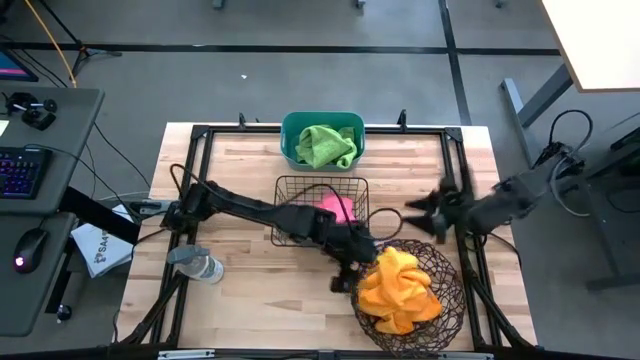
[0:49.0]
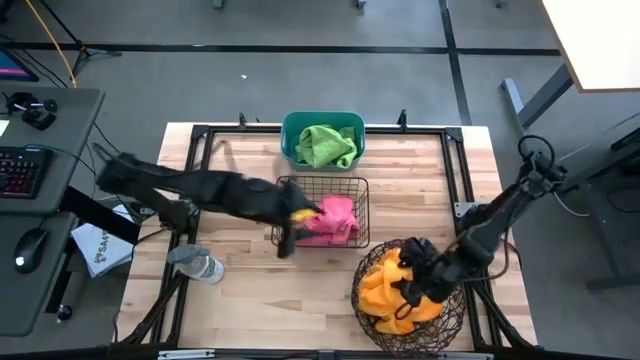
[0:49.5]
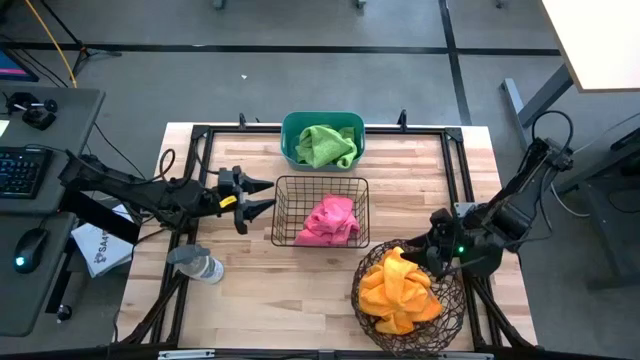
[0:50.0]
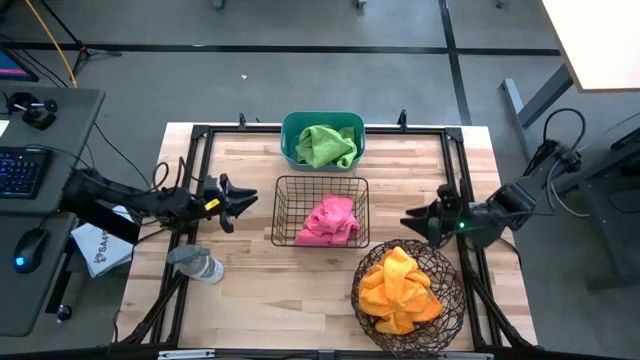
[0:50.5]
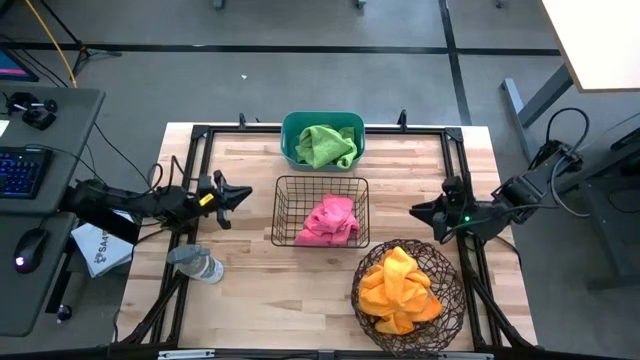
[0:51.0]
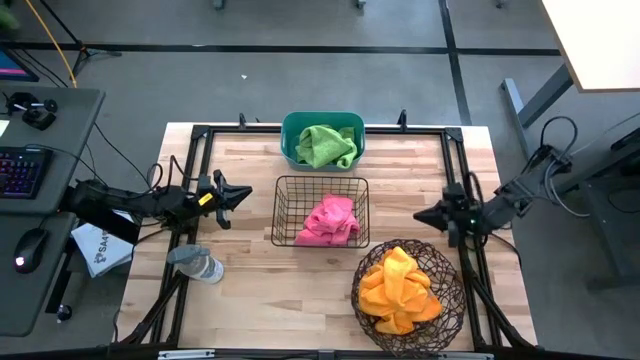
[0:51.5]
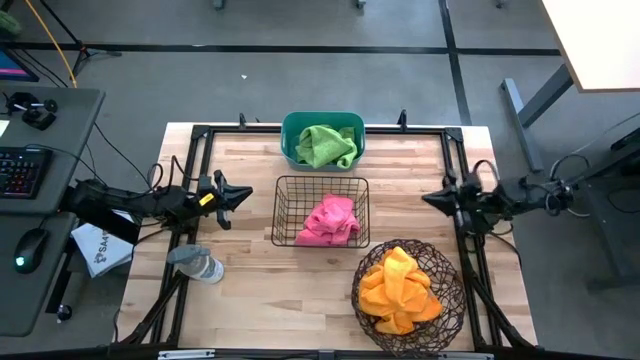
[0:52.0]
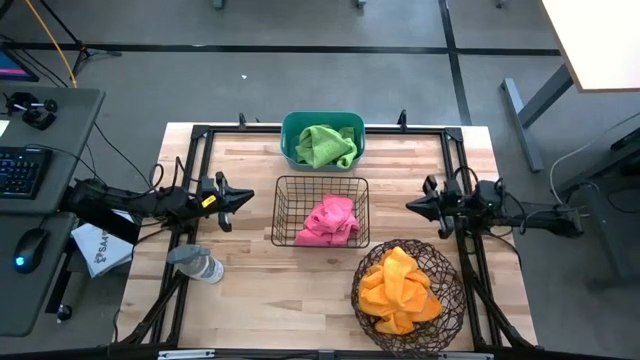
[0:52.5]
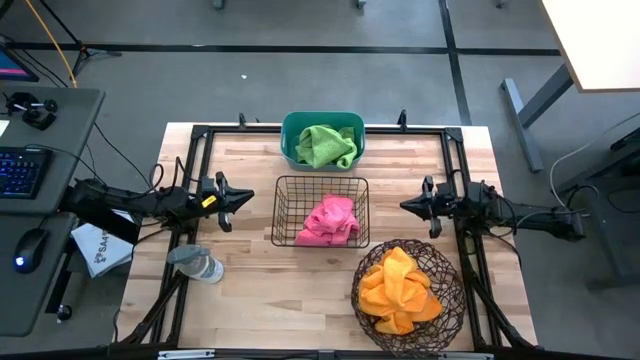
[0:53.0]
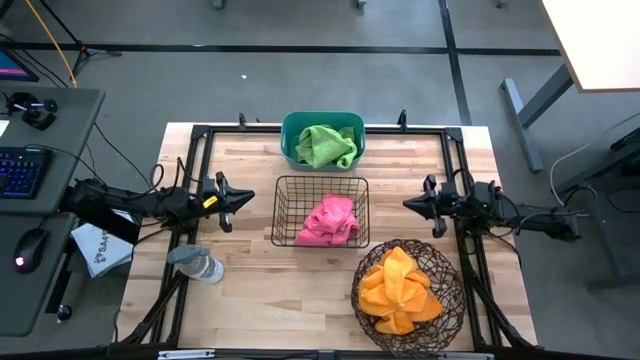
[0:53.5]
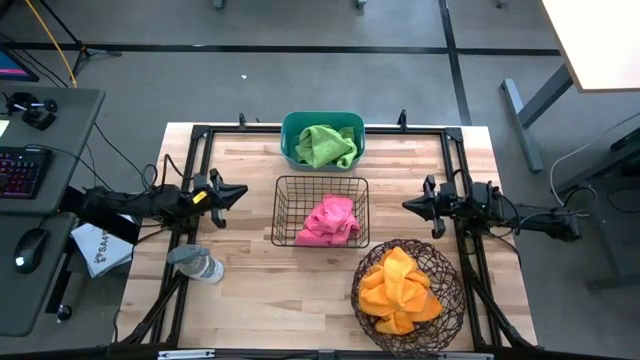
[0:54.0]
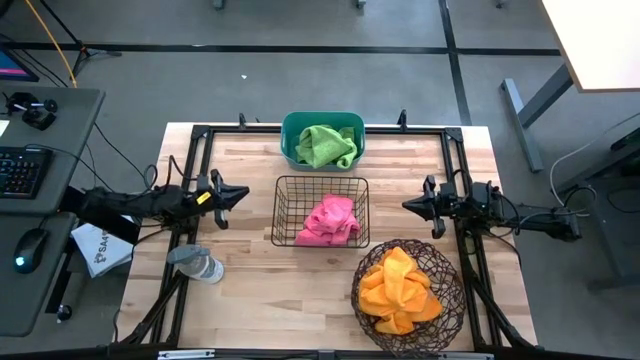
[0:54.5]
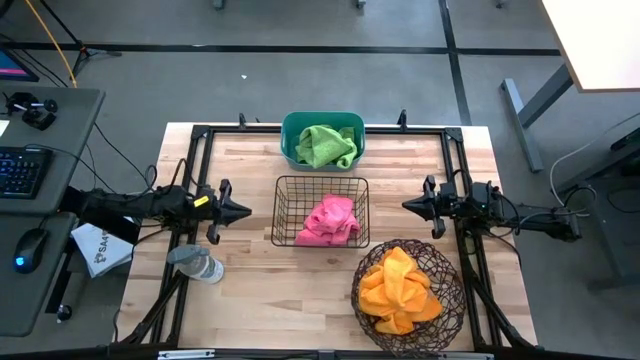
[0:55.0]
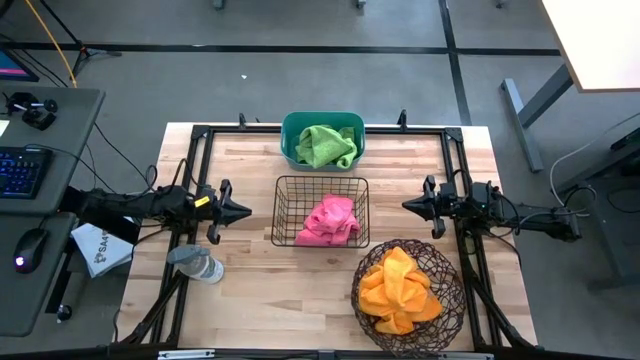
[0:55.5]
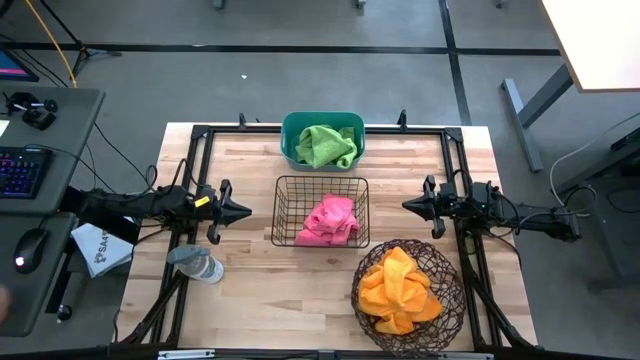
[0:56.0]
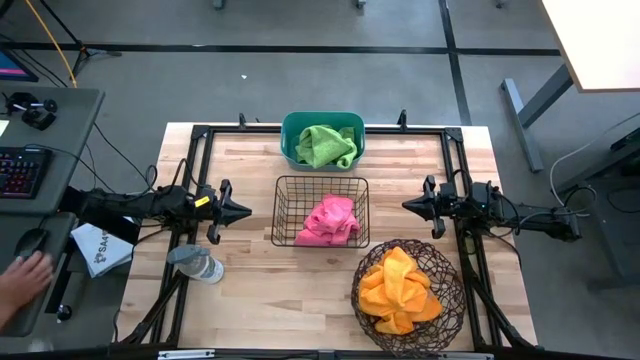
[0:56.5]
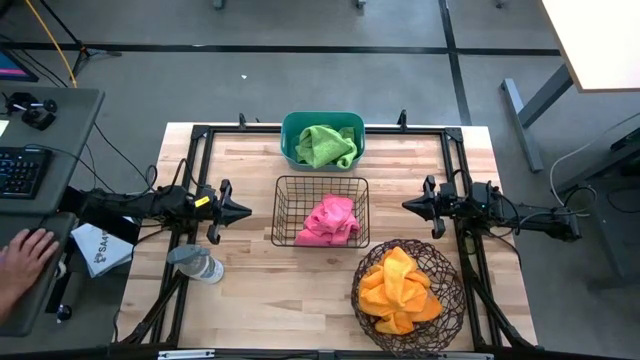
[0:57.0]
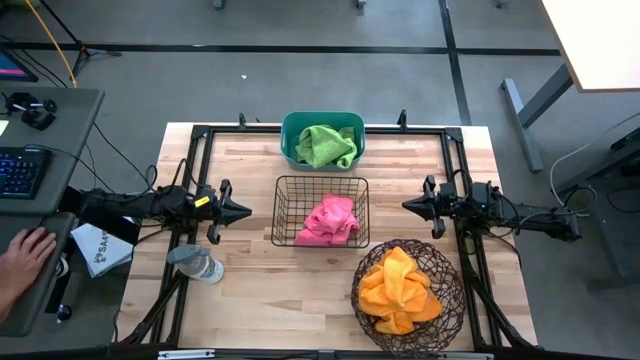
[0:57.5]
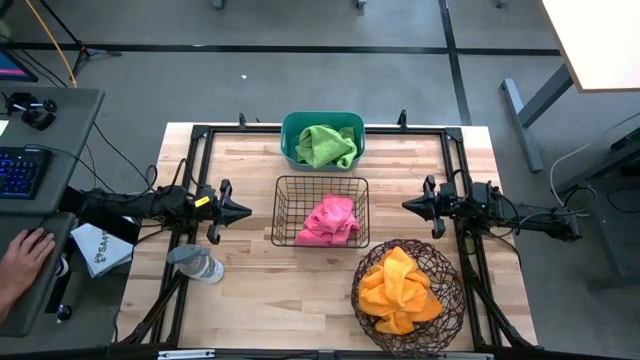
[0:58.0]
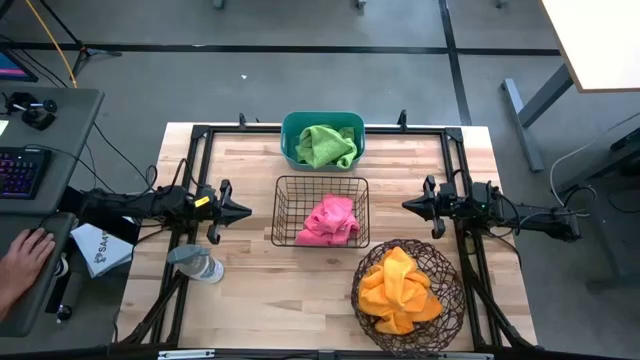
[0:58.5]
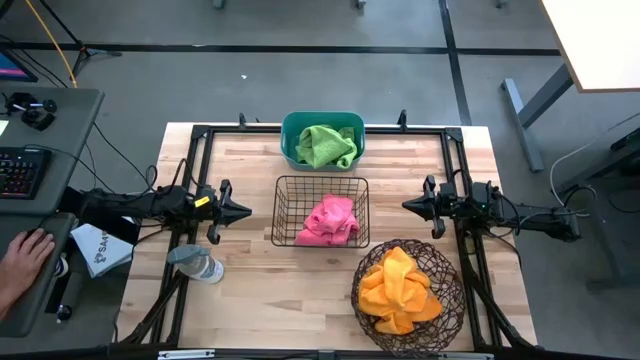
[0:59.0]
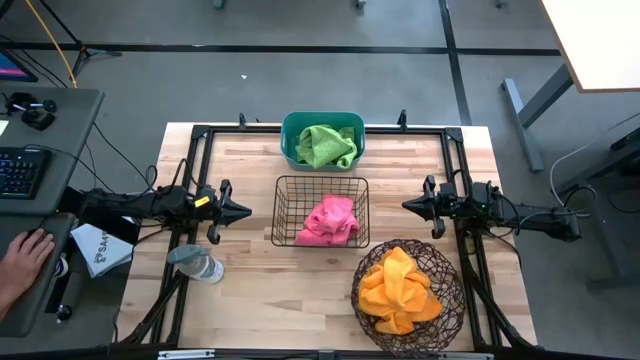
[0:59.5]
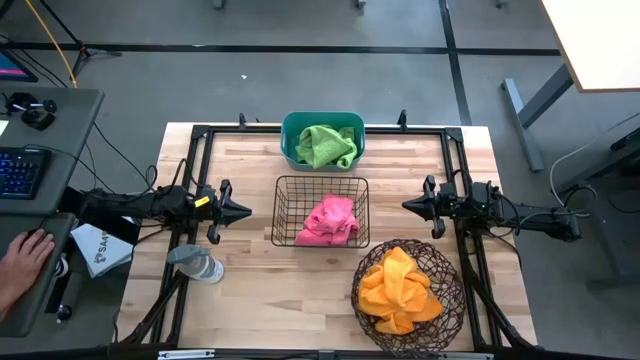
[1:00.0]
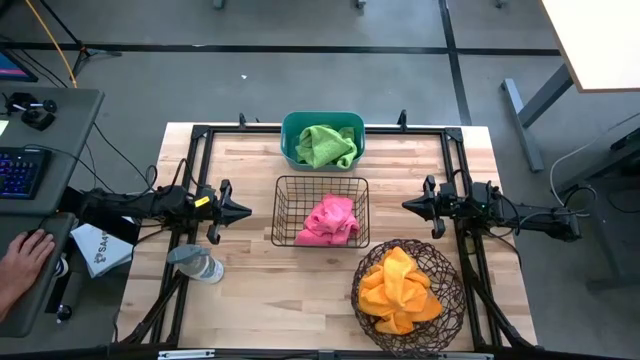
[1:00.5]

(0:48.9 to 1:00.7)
Task: Sort microfiber towel by color & place in baskets
Return to Home Position

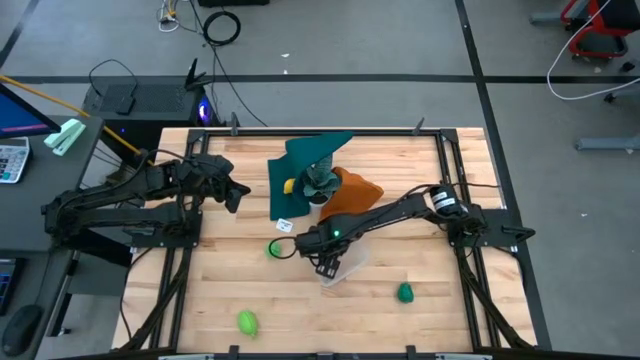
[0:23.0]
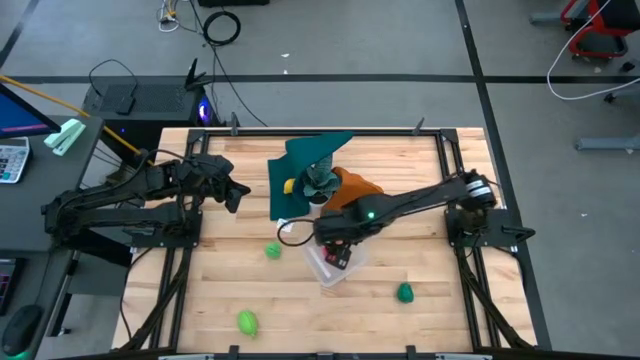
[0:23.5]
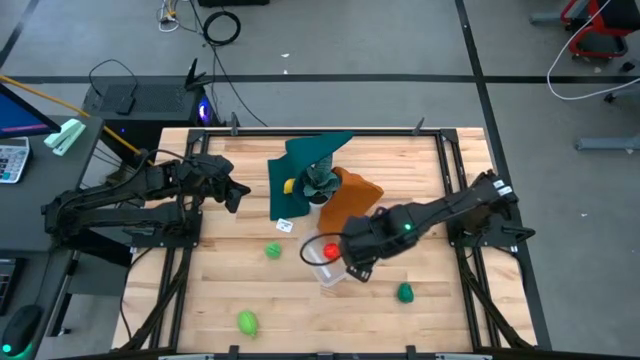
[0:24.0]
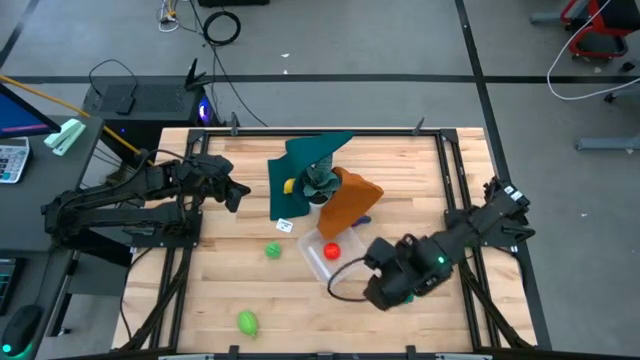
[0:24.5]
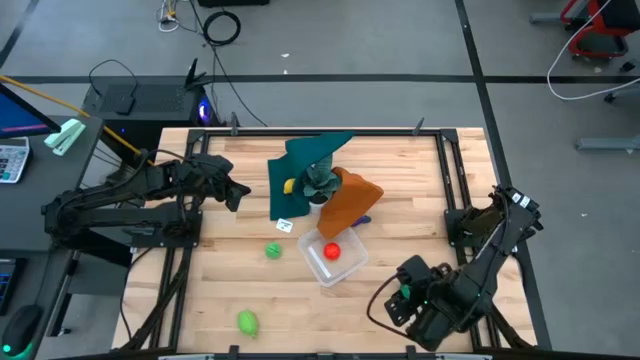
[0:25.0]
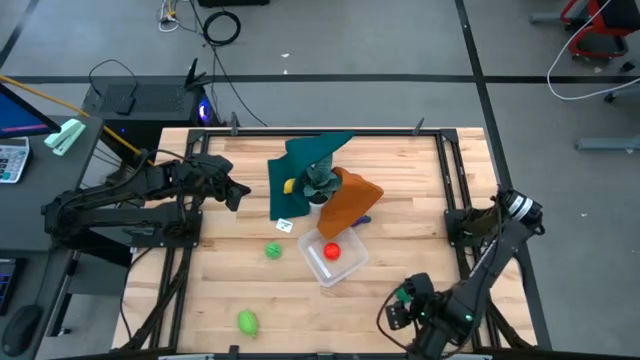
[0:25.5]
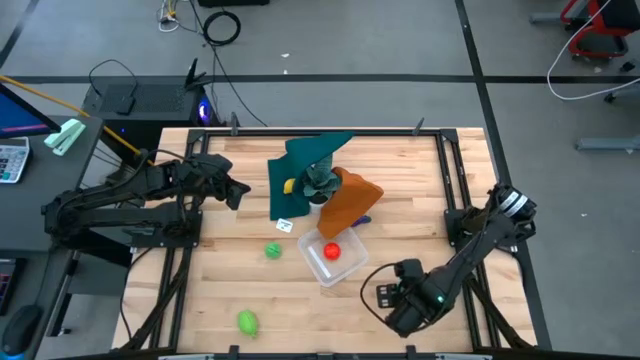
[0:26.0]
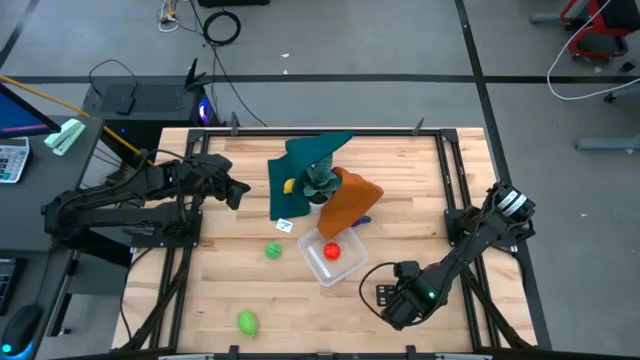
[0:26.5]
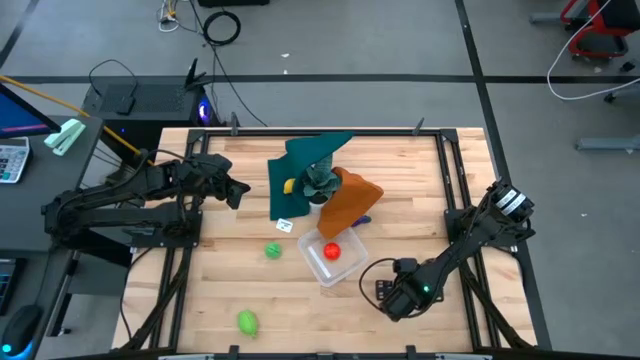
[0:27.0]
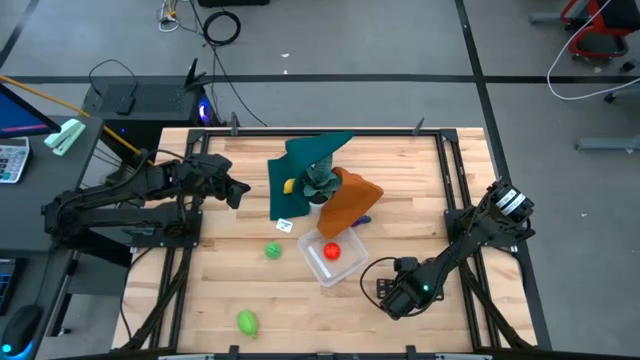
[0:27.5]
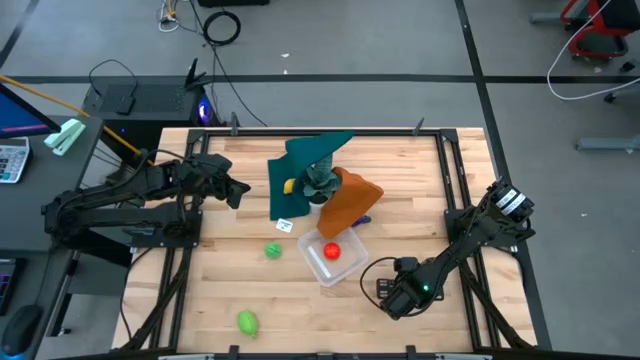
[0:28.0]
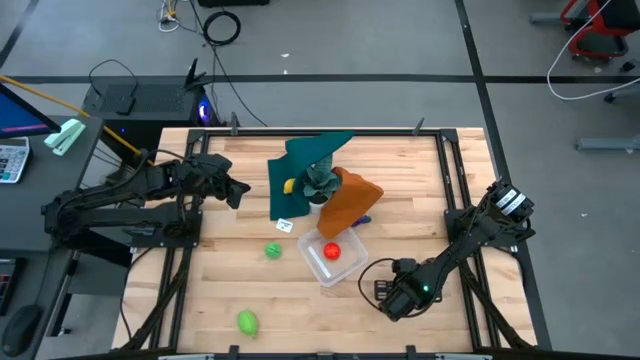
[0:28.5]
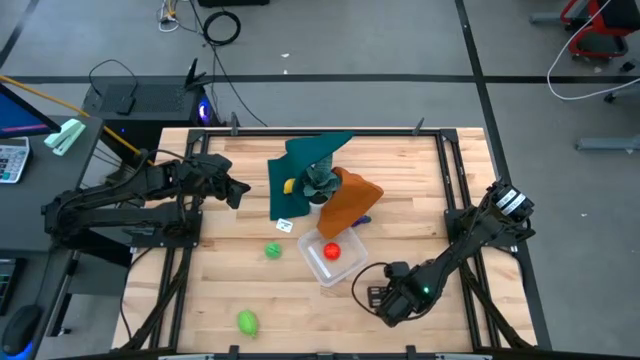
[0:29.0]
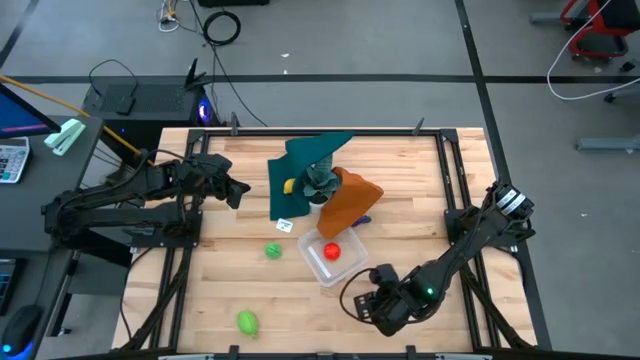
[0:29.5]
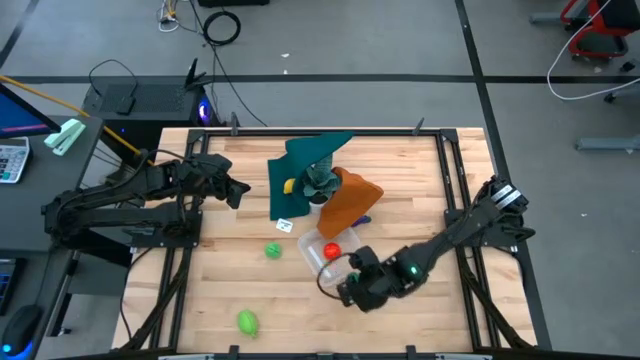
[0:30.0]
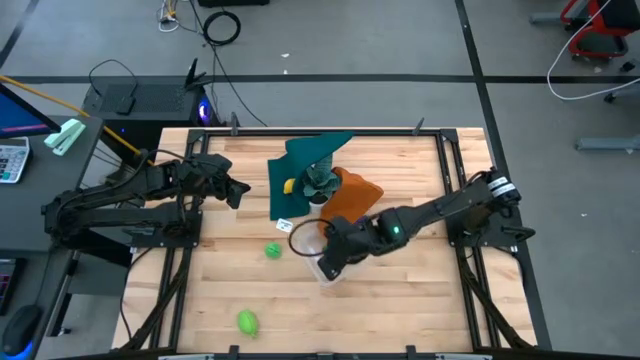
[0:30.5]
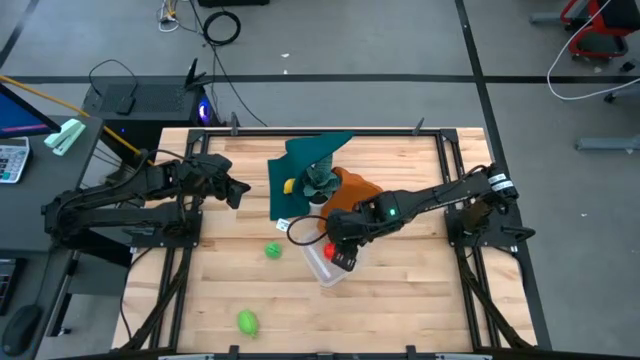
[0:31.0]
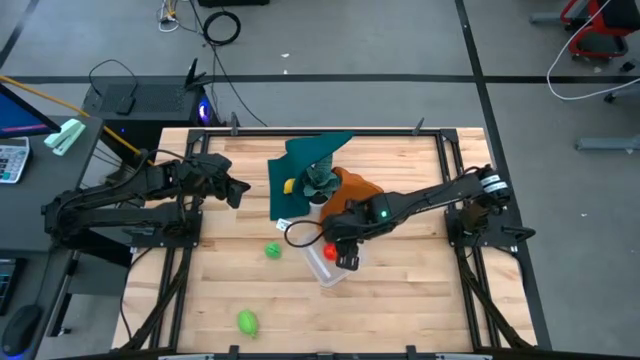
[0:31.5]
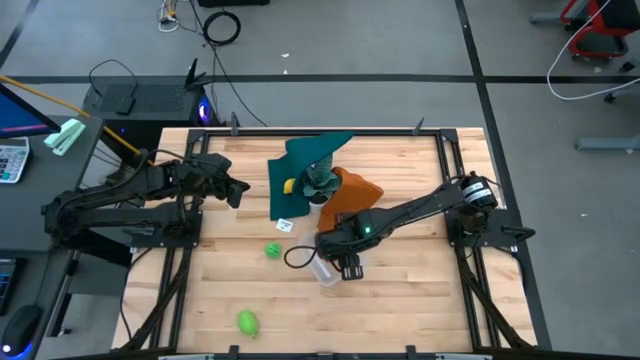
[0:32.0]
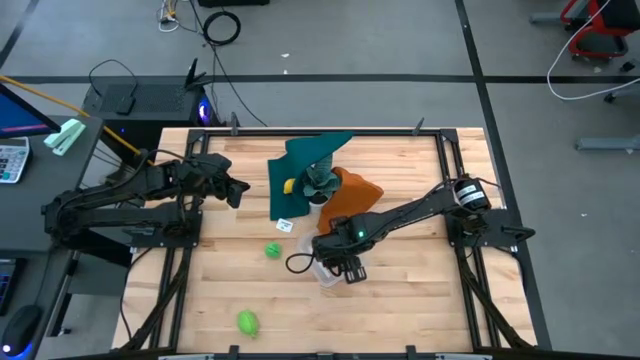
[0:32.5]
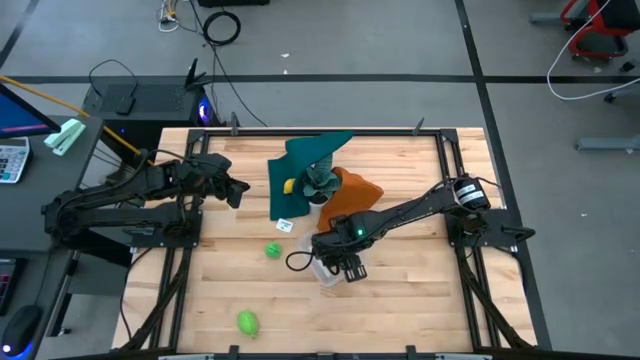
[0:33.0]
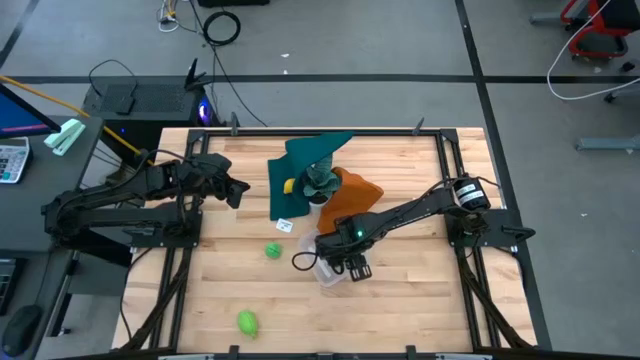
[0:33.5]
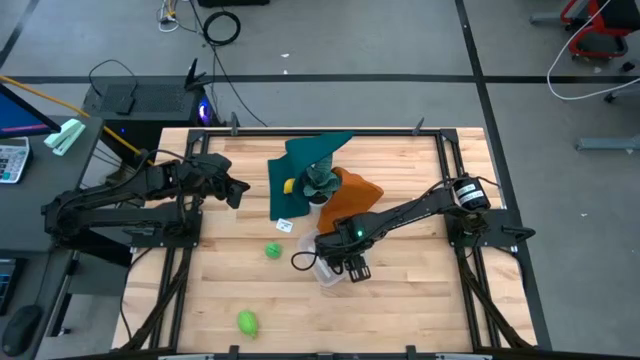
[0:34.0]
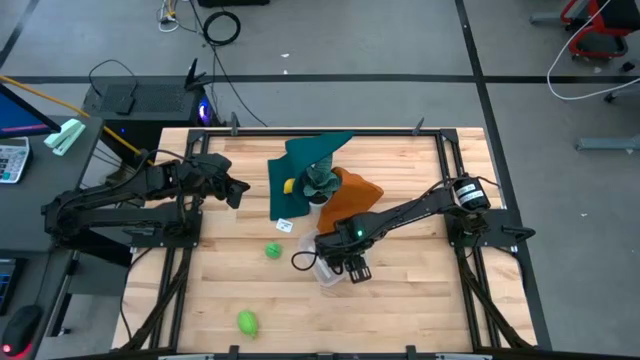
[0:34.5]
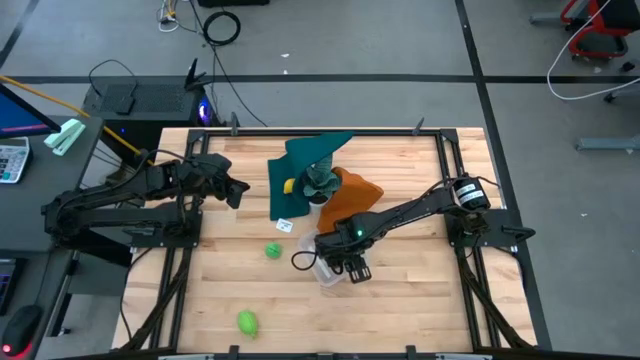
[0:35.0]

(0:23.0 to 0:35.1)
Task: Pick and placing Produce into tupperware
Put the bell pepper into the transparent bin
